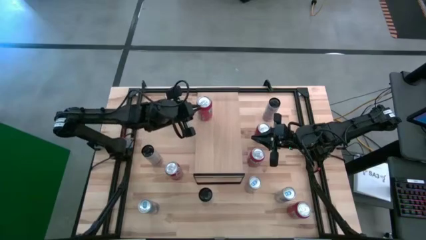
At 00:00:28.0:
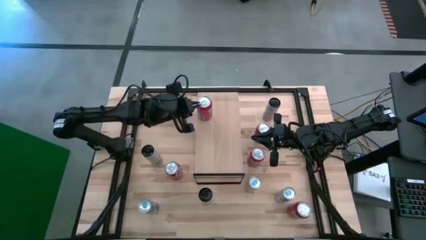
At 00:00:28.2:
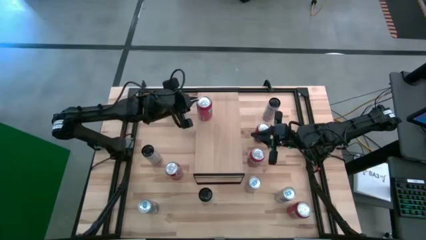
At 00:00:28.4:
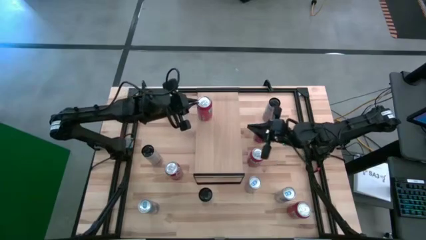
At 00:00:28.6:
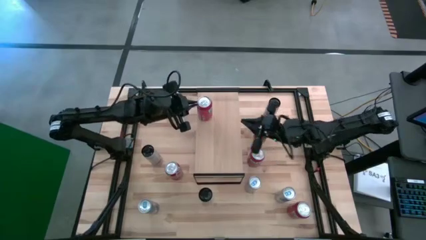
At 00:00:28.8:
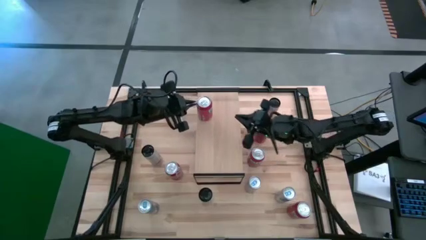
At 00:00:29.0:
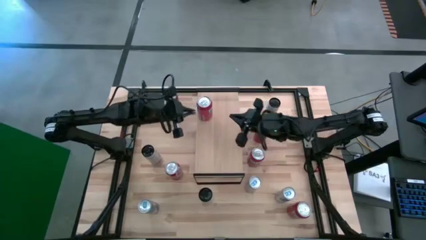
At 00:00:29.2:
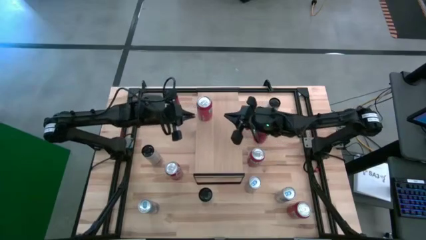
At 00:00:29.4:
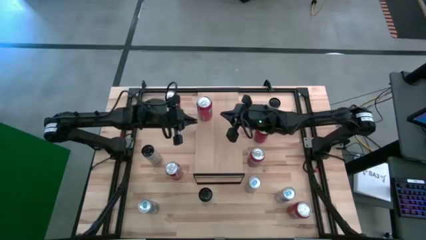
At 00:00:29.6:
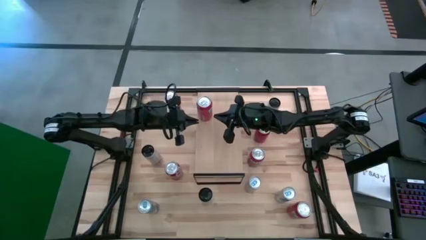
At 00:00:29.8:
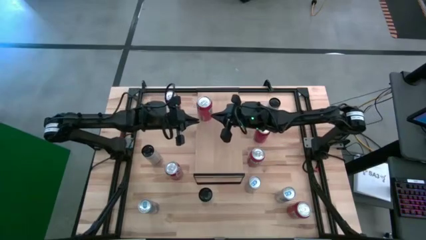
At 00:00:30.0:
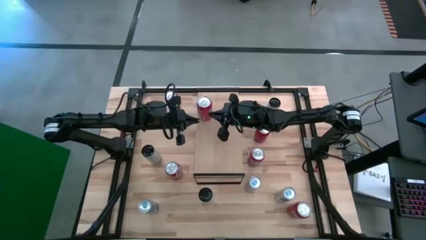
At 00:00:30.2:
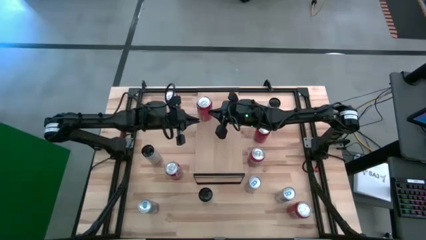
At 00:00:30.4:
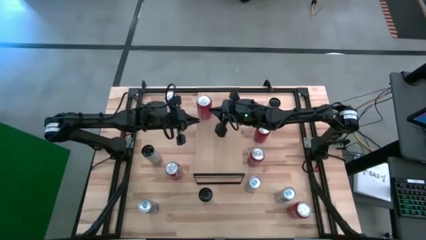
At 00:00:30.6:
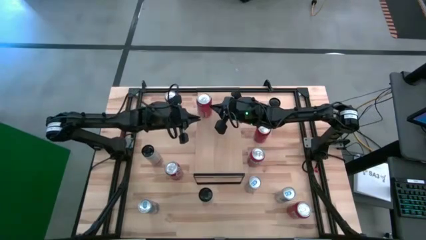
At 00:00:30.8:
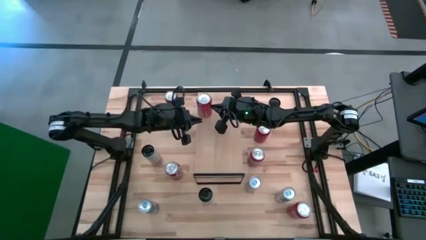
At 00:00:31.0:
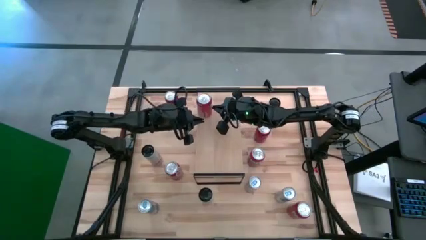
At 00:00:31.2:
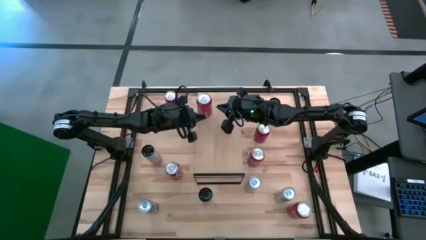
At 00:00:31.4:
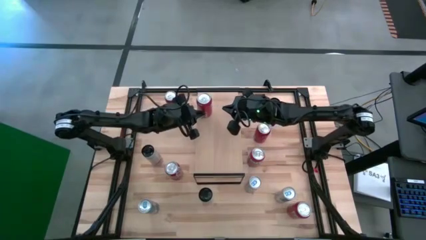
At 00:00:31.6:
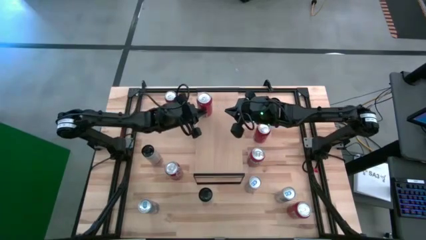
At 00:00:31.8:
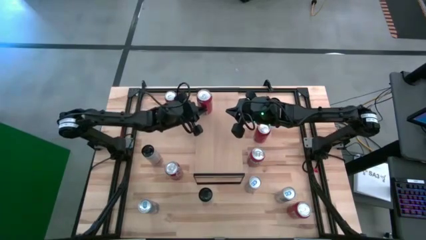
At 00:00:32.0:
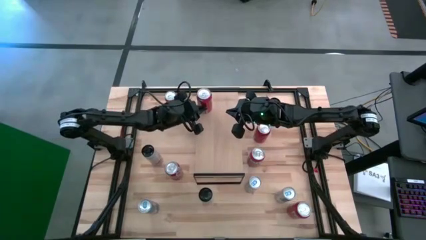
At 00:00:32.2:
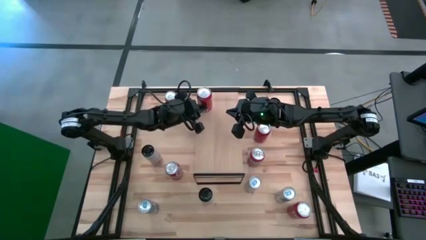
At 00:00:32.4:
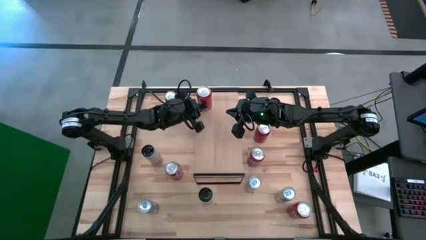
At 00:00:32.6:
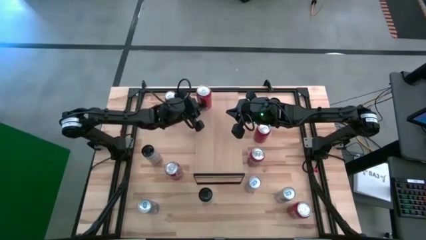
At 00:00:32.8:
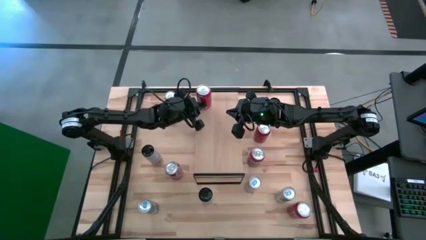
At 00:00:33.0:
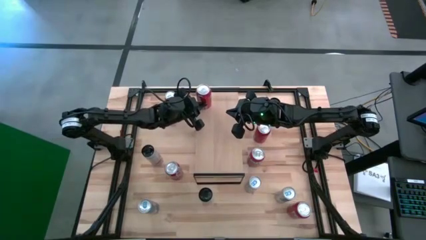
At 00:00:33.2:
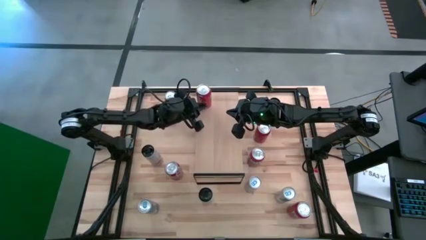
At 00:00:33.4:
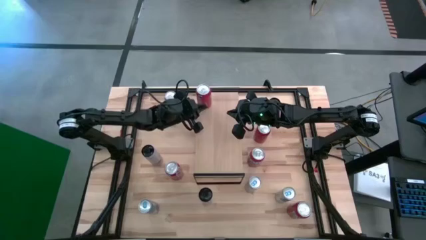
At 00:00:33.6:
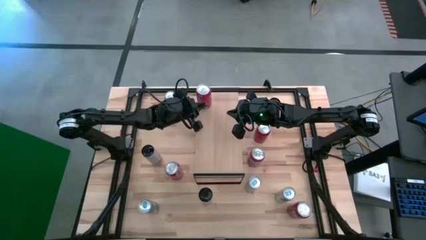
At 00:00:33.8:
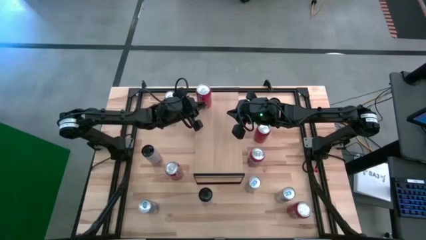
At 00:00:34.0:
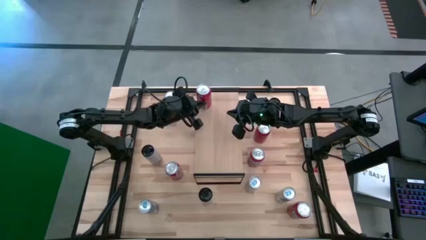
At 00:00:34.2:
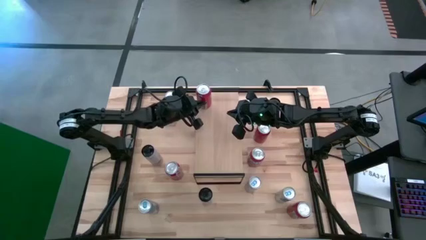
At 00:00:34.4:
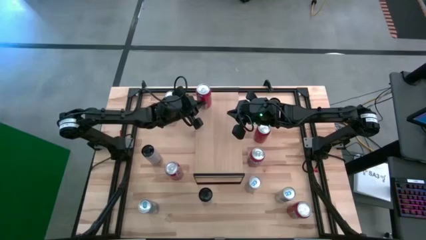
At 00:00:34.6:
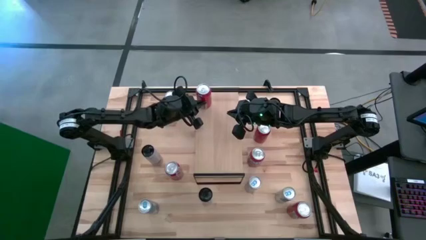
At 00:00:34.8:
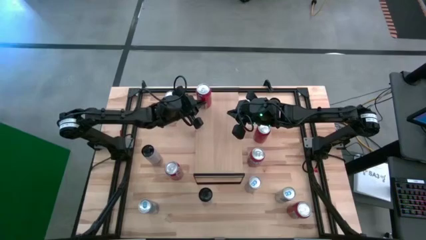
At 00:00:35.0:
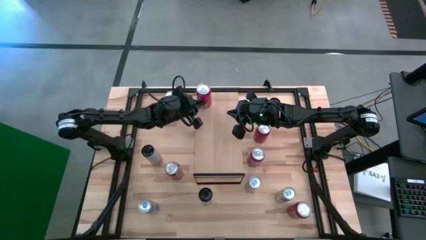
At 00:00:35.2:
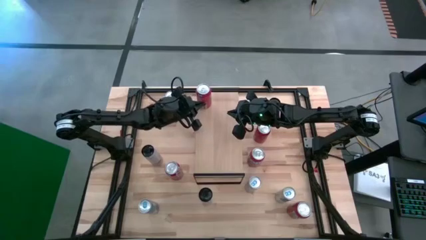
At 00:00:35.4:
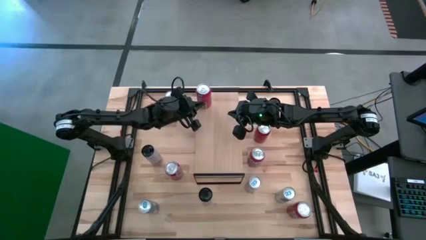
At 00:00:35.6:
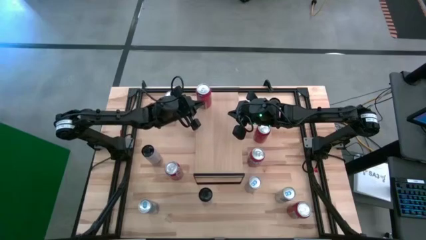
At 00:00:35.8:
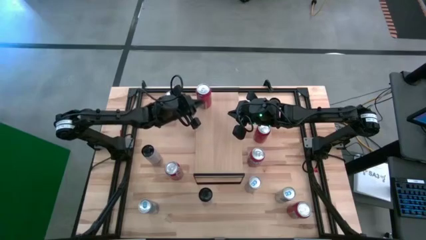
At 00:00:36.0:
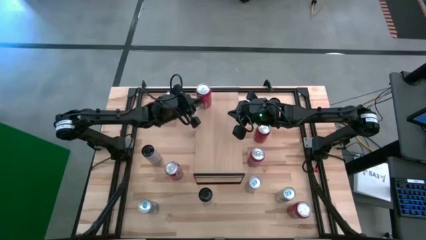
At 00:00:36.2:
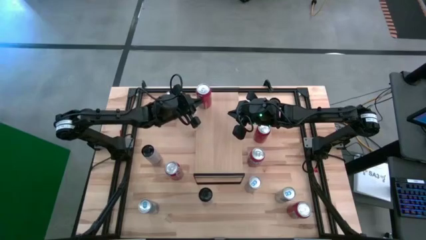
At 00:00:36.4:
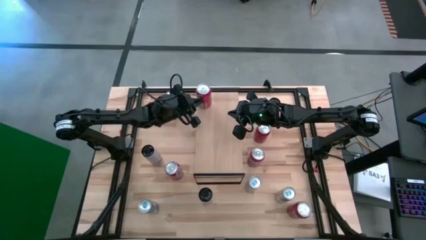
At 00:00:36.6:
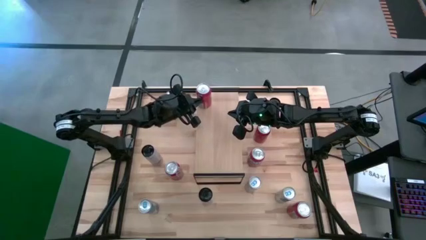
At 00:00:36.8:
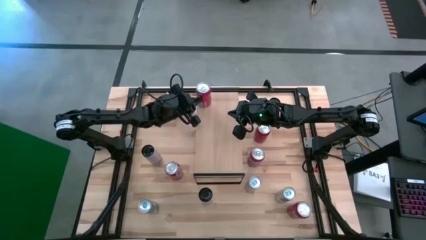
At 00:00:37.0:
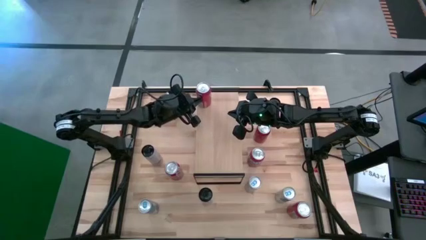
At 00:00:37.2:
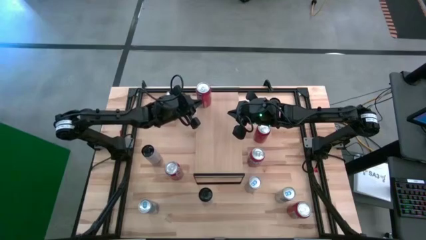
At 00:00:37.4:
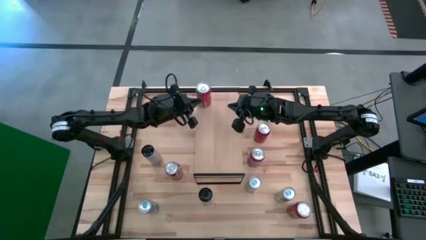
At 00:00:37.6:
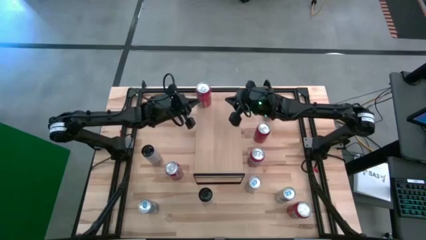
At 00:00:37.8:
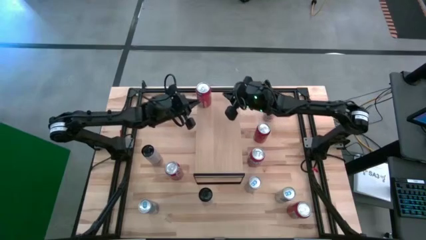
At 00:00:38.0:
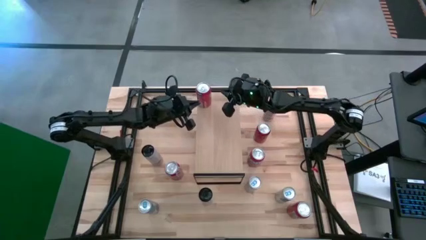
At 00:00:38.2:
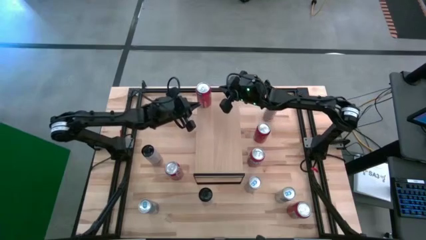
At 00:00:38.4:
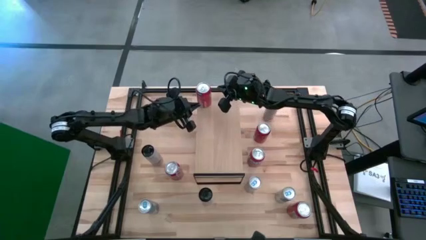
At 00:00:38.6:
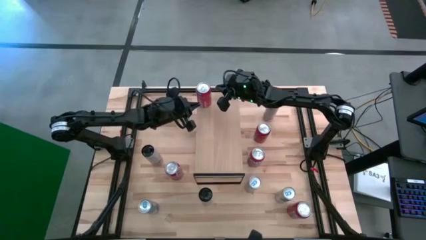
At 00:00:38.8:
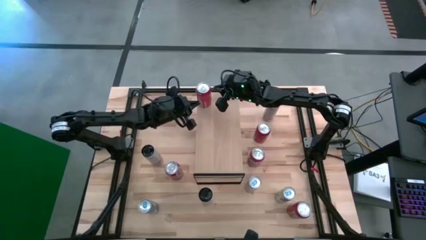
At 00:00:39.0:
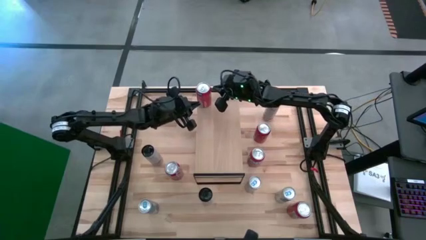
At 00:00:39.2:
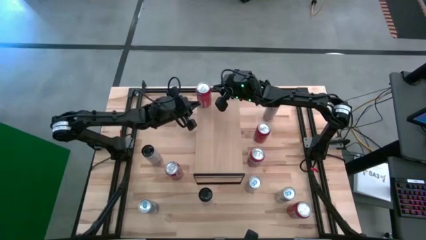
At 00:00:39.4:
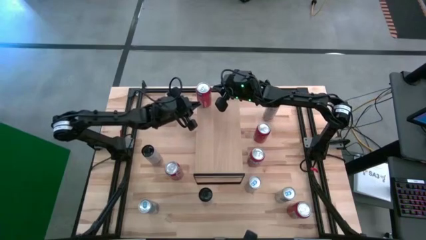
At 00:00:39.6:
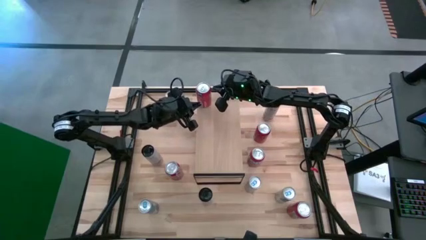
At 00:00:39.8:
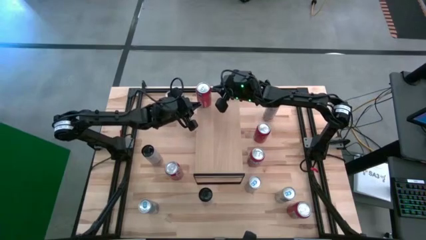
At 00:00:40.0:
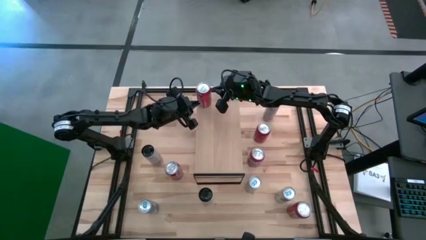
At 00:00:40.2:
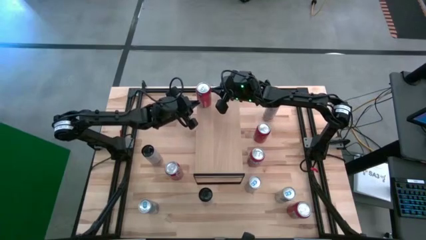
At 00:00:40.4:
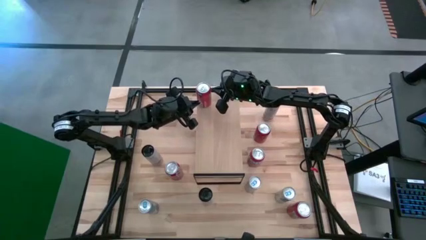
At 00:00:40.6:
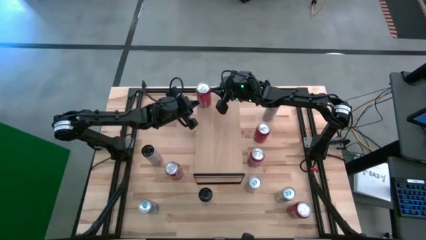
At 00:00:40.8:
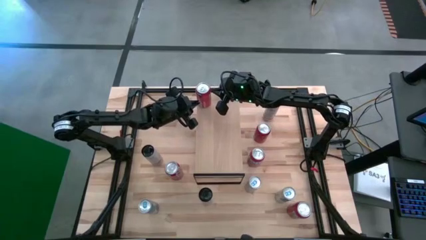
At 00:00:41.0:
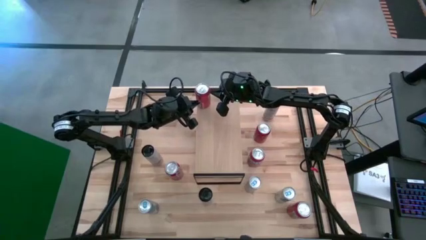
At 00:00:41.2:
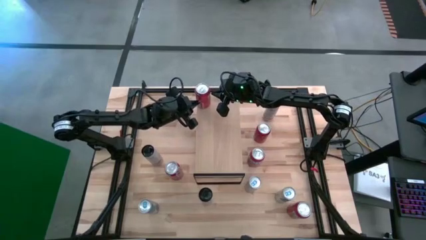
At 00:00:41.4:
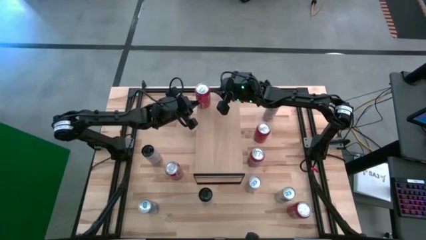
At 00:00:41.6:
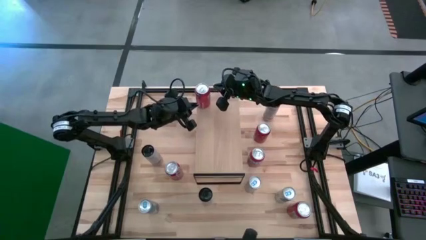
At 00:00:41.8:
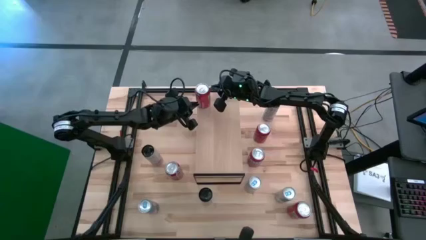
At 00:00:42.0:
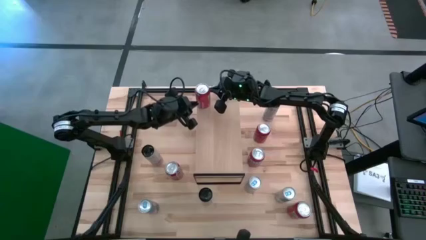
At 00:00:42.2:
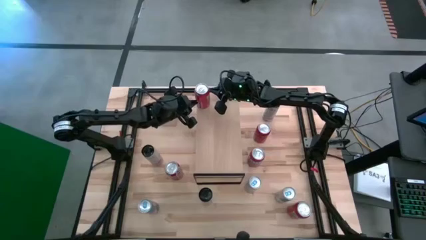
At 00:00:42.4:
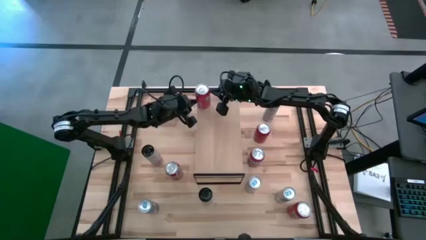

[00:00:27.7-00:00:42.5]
Task: Place canned beverage on shelf
Put the top left orange soda can on the shelf
